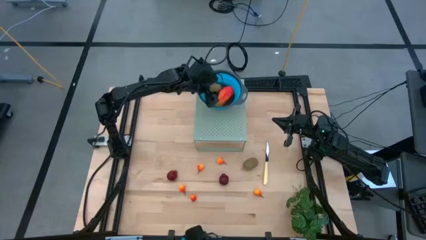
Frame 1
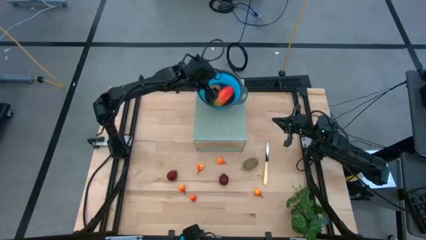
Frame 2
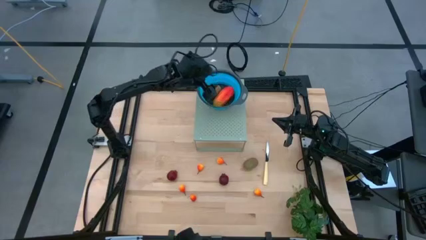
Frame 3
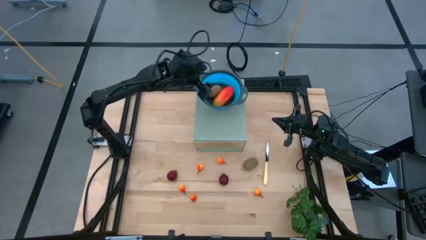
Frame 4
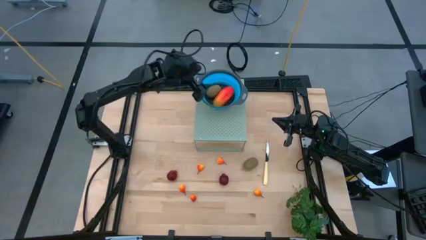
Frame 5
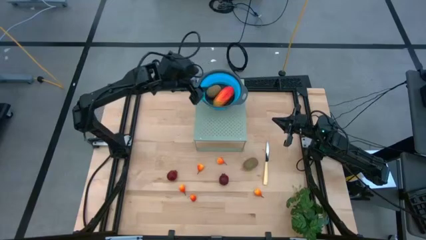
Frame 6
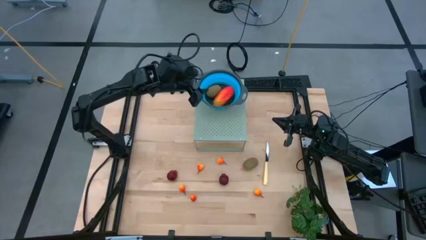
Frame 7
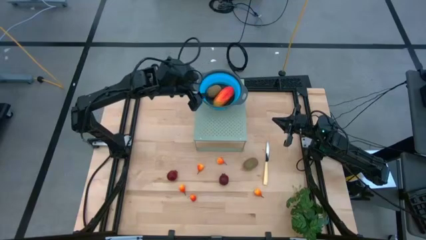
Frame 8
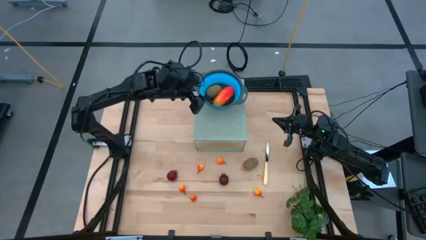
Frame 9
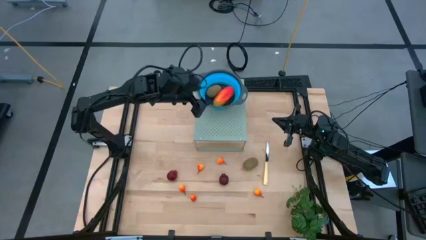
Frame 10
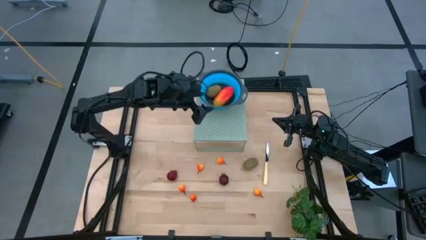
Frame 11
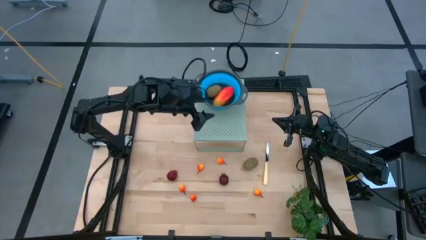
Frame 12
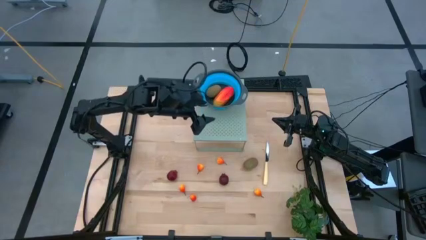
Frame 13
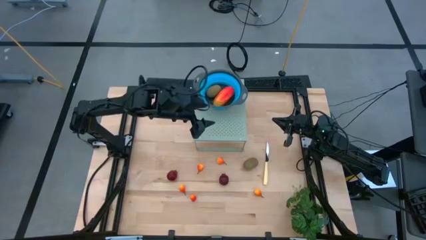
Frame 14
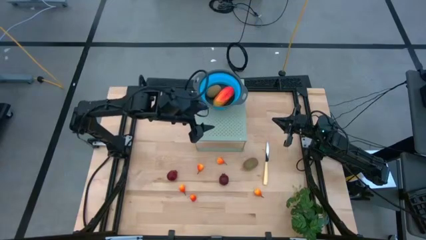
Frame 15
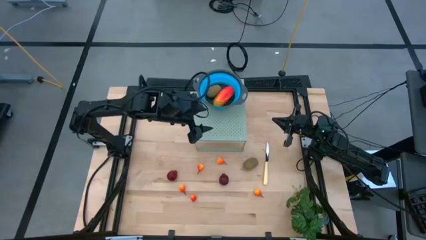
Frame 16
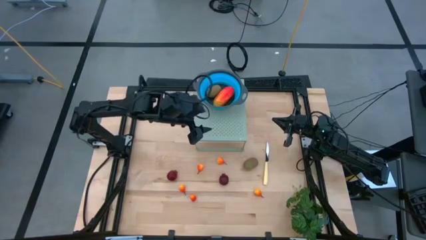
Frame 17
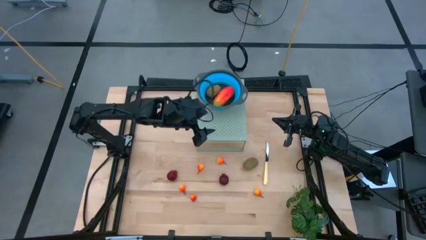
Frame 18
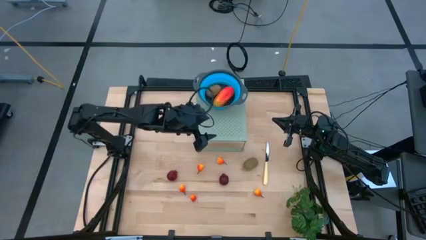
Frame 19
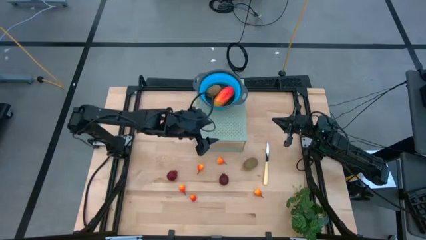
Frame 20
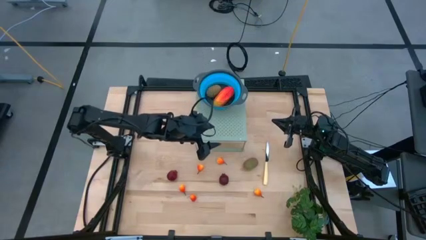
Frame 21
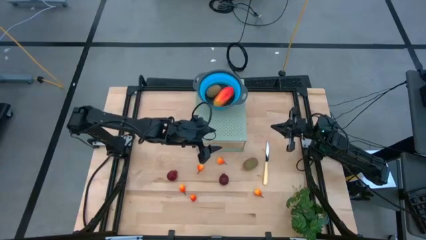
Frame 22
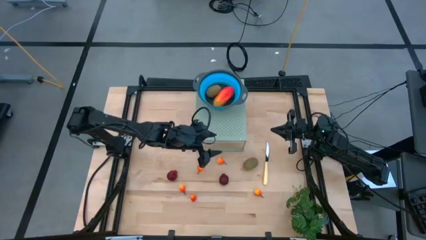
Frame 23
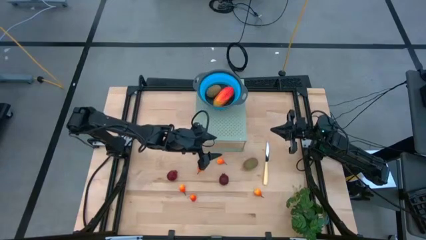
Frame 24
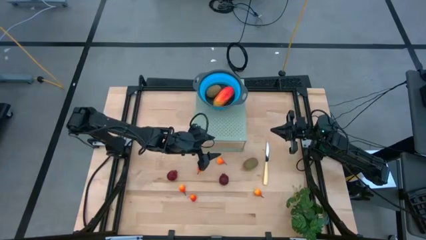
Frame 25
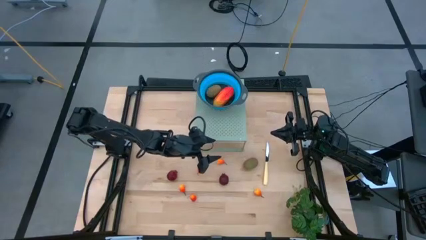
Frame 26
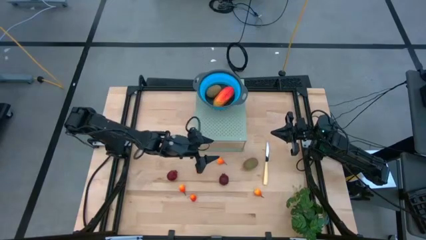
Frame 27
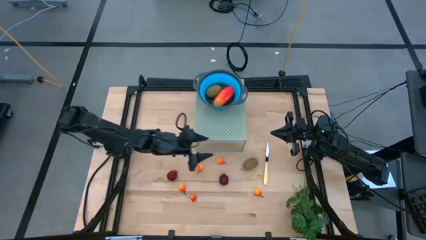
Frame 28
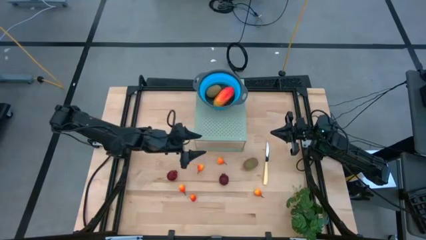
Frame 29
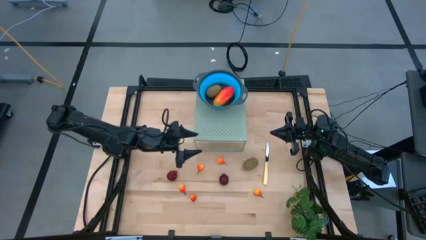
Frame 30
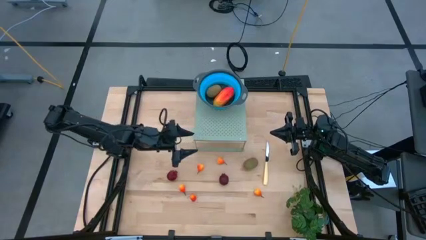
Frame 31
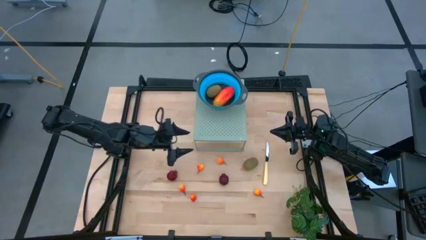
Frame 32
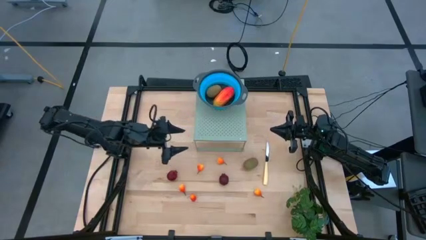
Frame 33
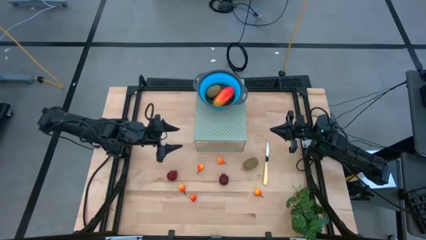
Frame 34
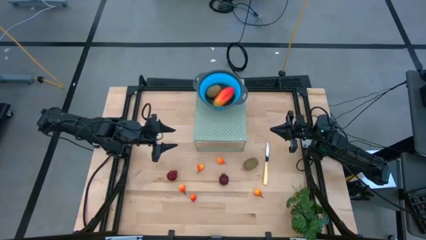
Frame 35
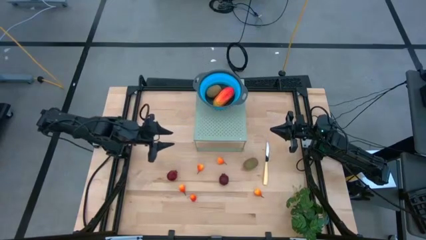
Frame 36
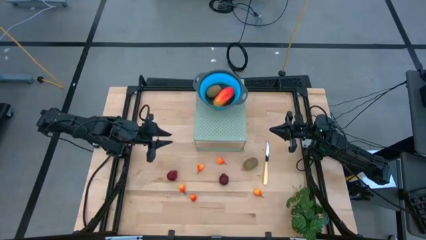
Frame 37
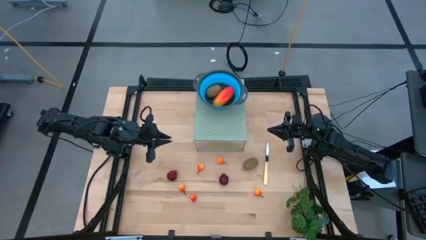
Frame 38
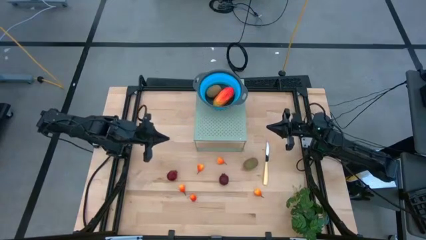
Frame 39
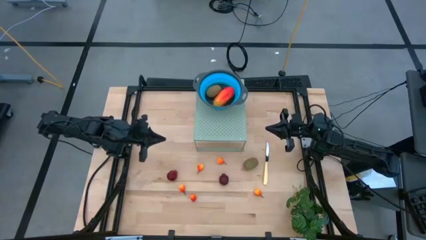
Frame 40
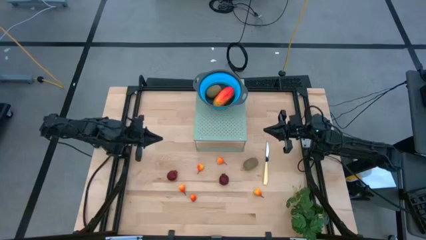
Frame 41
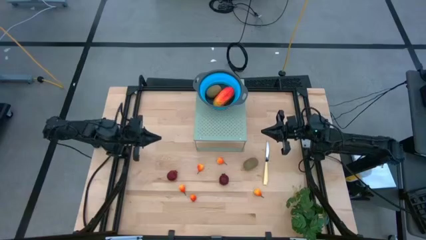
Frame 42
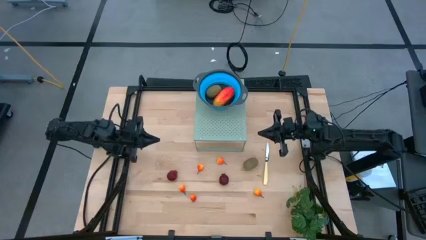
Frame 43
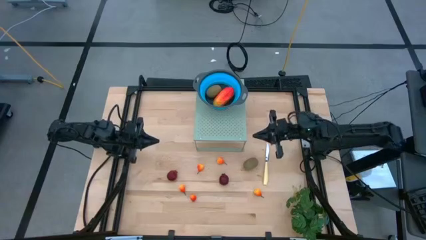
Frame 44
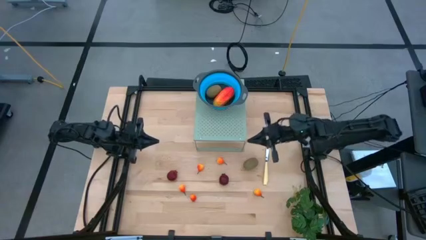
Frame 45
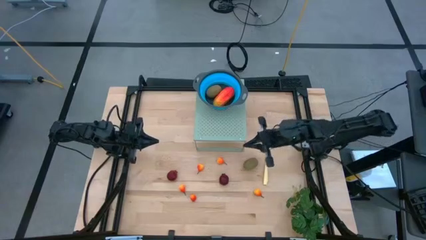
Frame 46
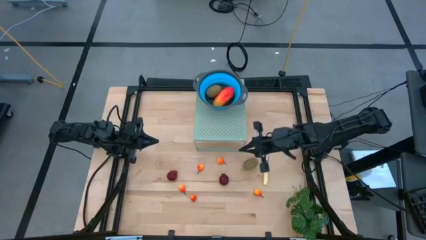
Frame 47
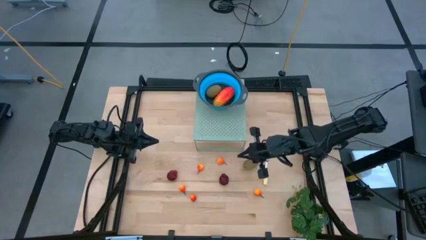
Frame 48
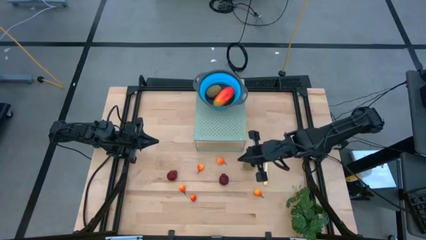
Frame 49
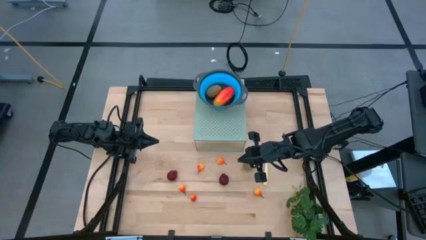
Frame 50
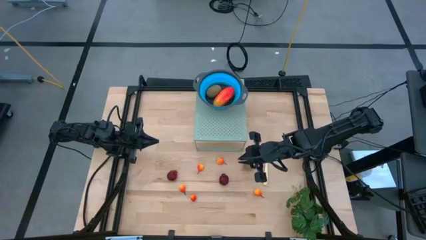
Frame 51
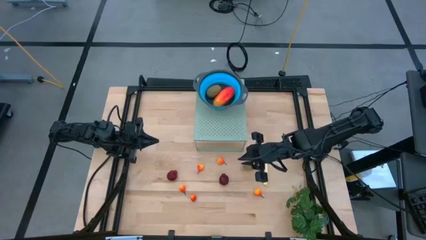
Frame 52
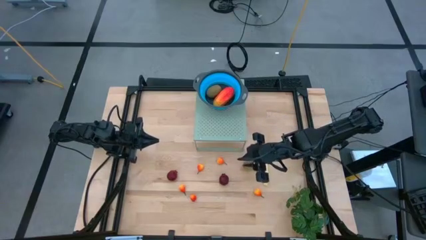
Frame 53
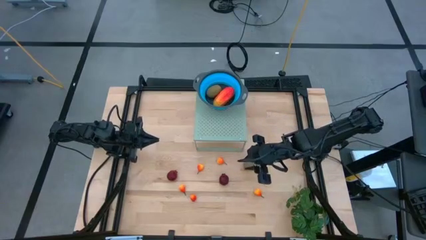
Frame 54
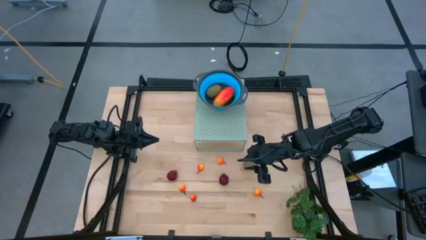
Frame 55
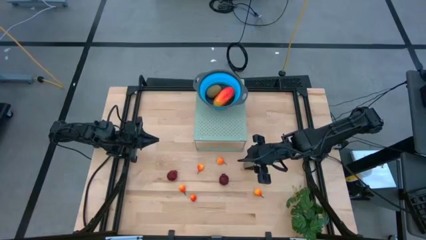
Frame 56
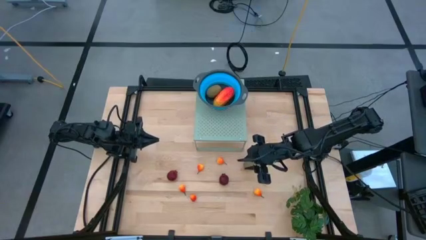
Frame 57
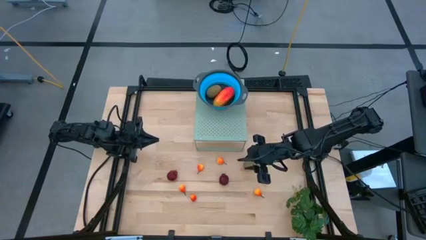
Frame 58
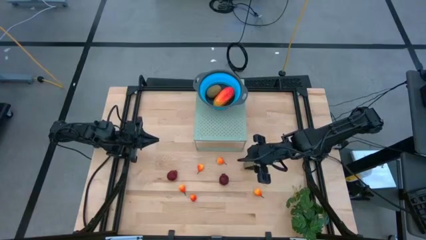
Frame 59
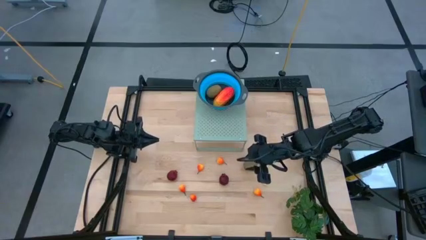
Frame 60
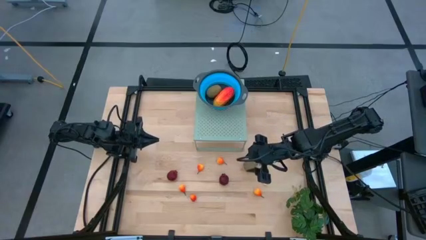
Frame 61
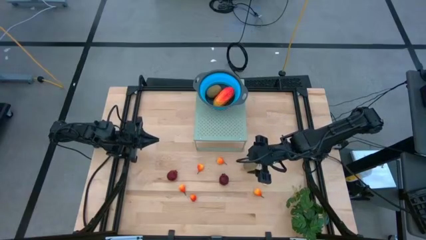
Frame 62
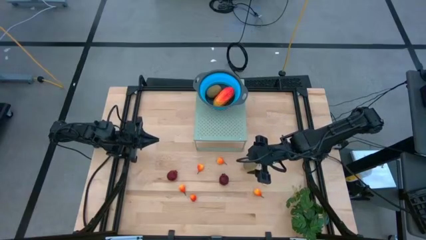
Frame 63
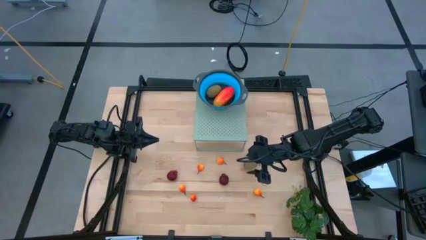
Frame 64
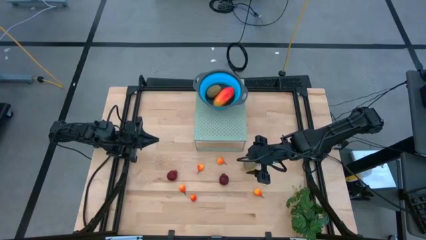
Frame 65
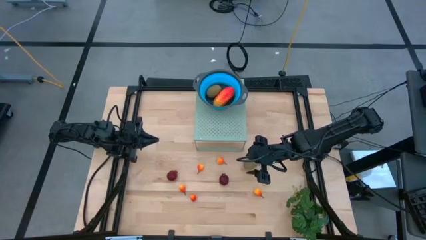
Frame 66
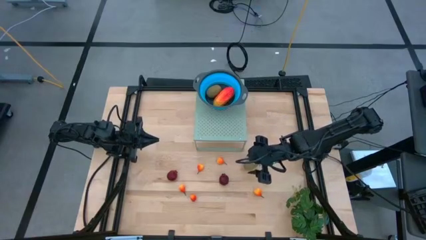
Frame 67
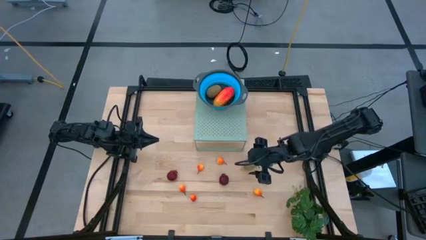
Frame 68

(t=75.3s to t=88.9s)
Task: Pick & Place Fruit
Put the kiwi into the blue strainer bowl on the shelf
